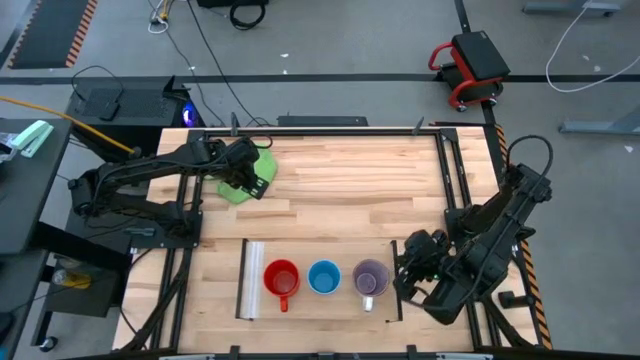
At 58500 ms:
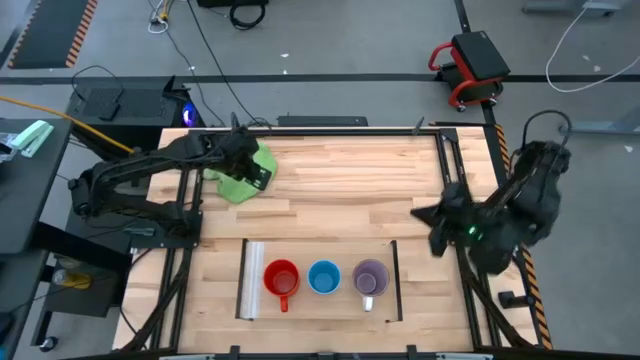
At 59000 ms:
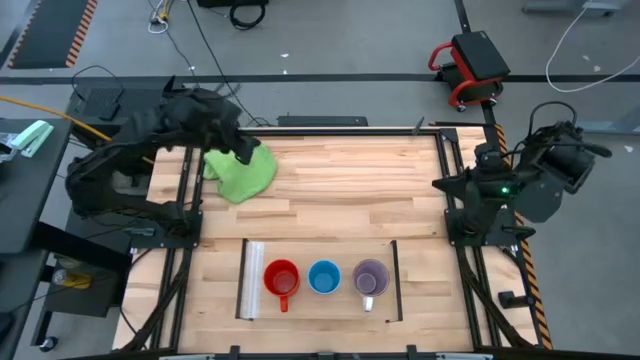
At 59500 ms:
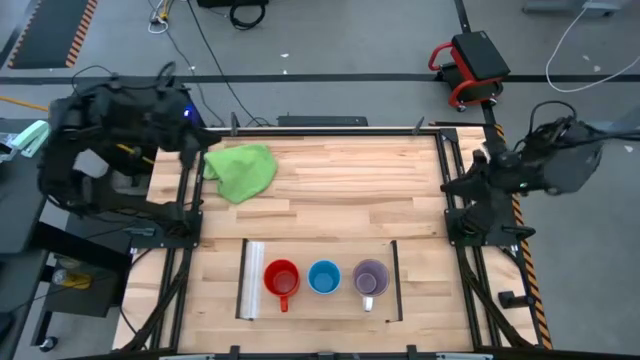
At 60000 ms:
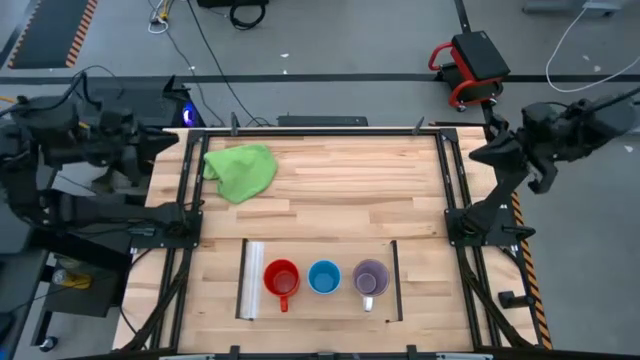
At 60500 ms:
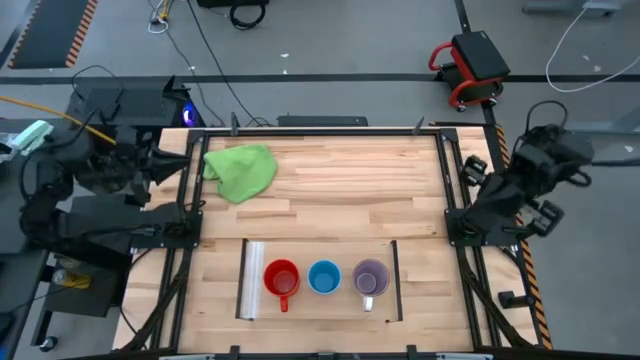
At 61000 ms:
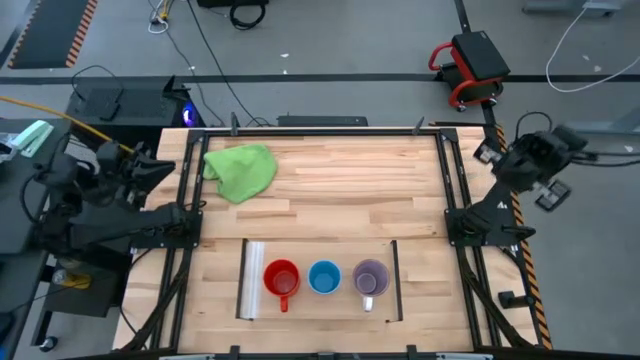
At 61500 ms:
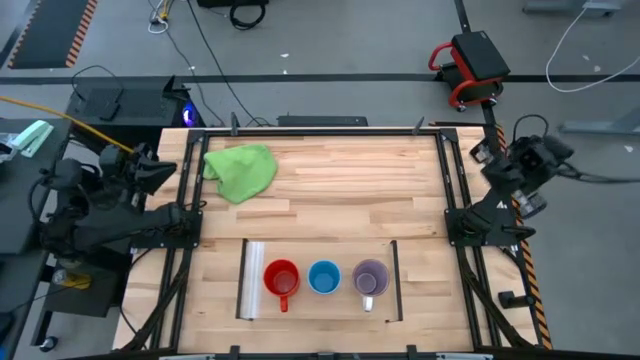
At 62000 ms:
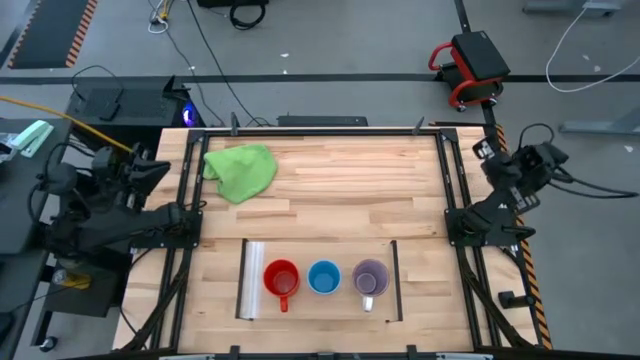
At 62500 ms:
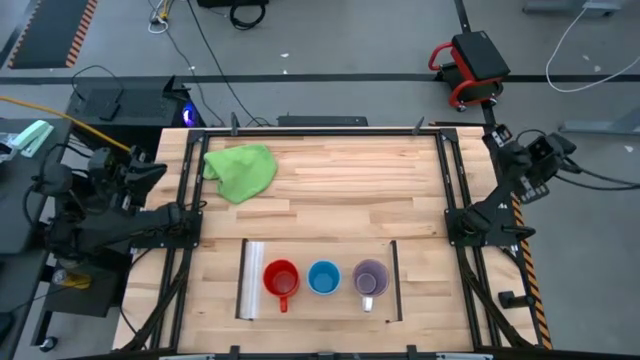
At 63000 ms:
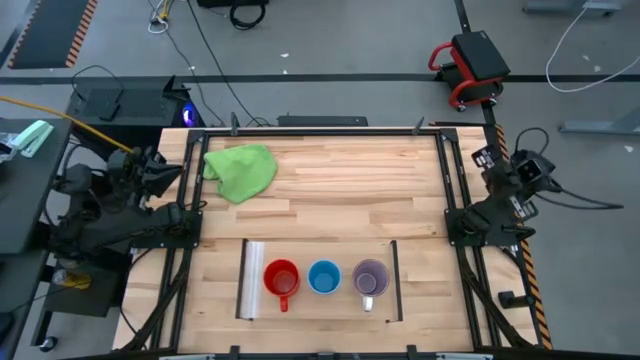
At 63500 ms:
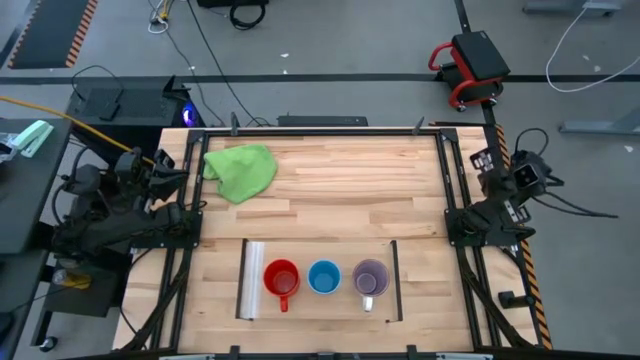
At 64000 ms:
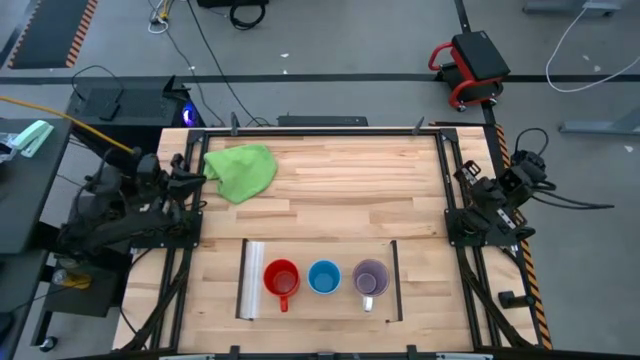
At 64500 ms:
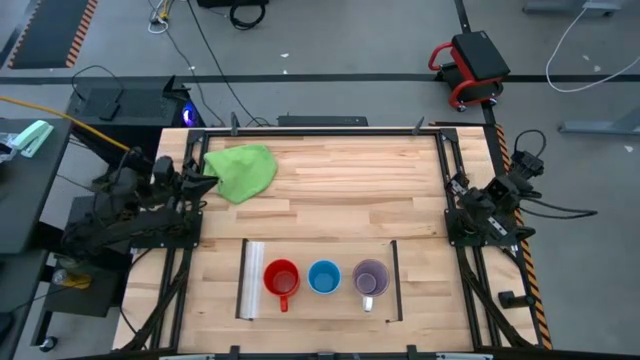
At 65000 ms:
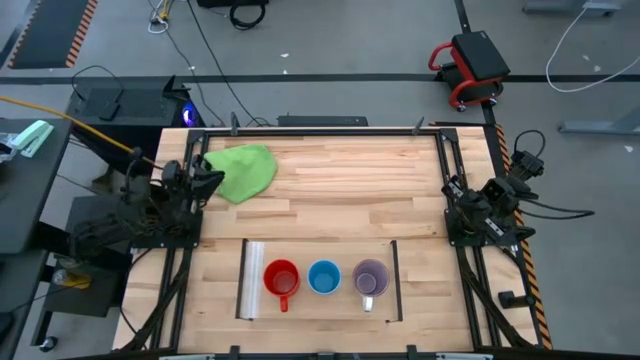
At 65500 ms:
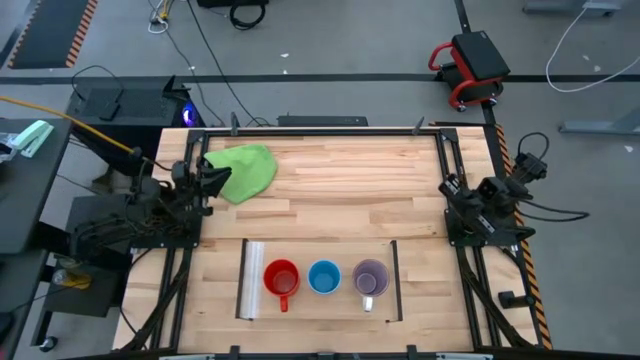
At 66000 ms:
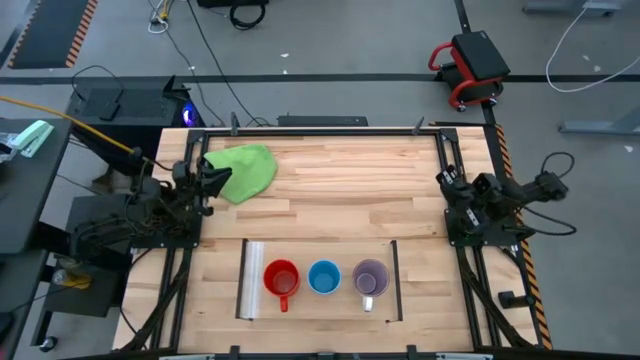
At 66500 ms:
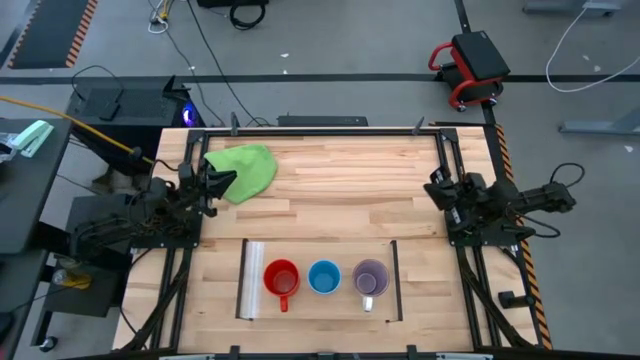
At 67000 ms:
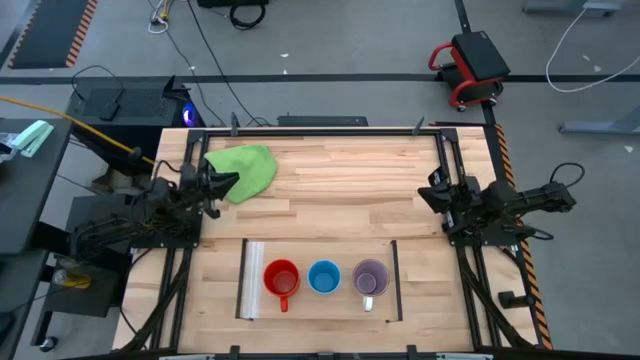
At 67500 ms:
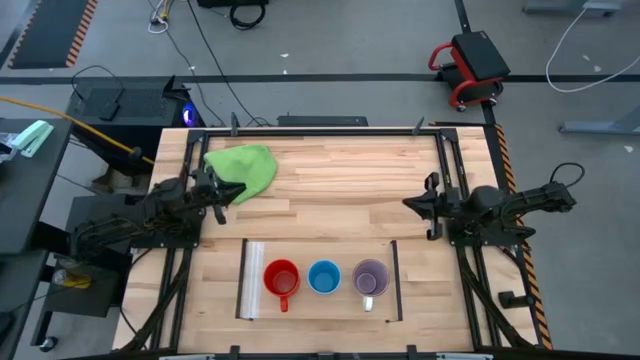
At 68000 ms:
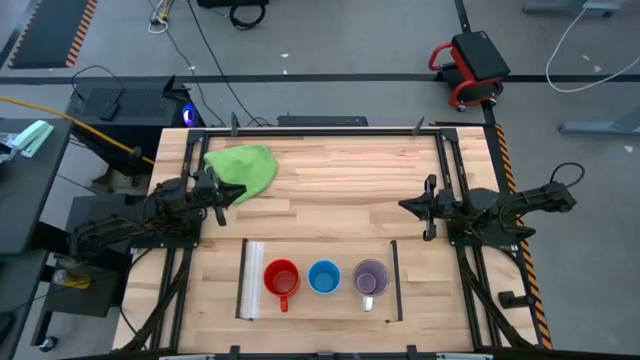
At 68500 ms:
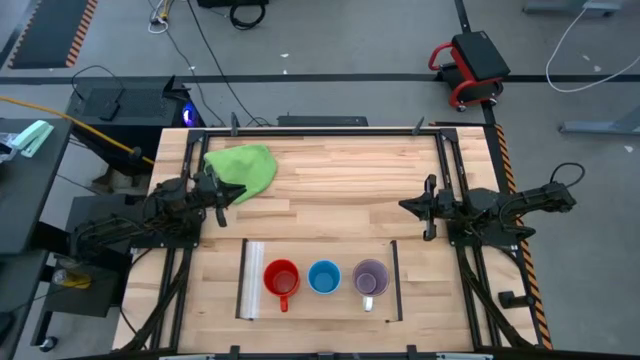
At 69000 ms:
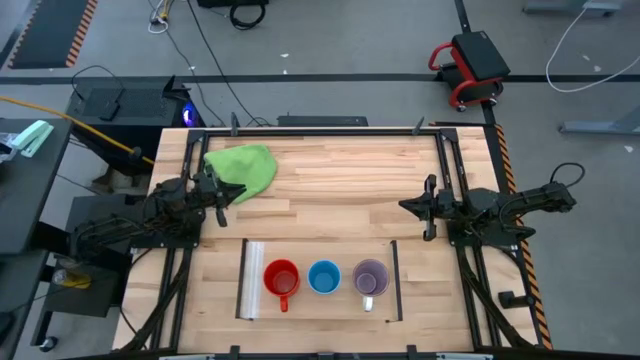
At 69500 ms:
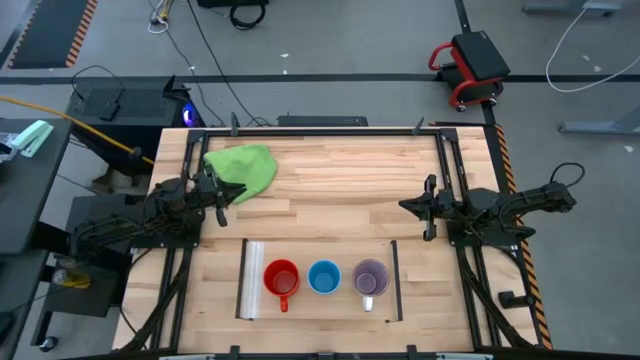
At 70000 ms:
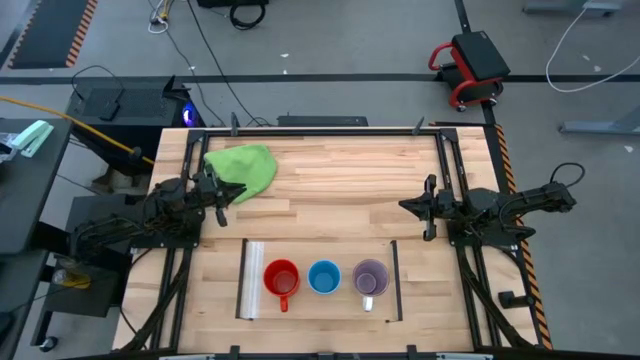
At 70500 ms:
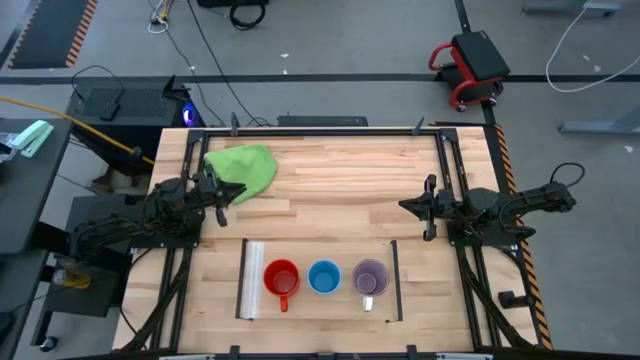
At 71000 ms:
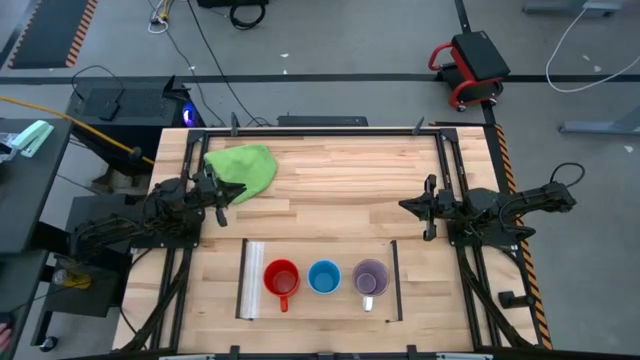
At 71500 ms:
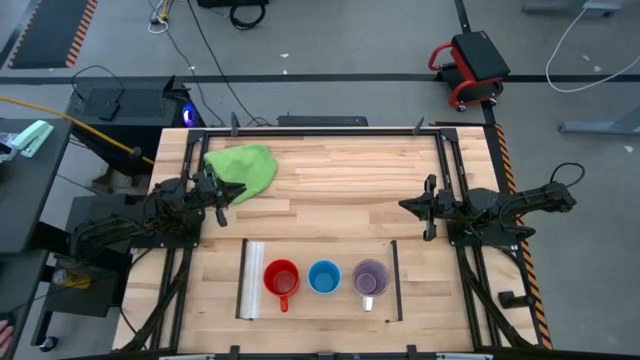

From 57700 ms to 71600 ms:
Task: Stack small to large cups/mugs on shelf
Return to Home Position
